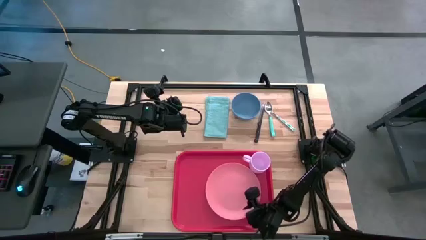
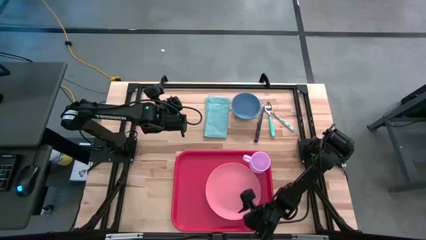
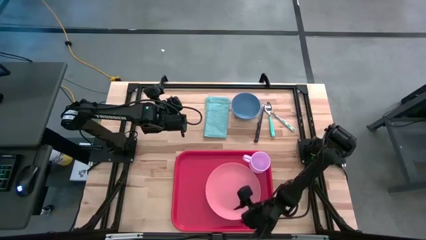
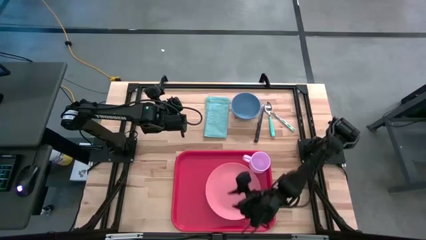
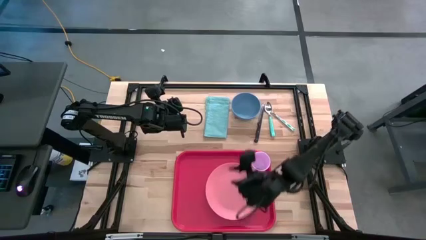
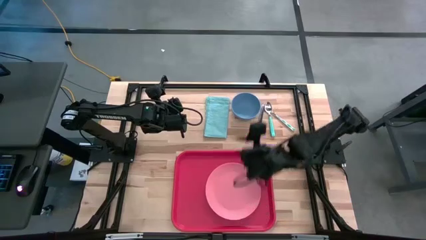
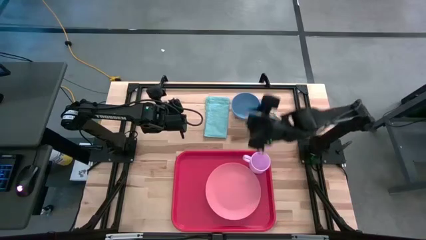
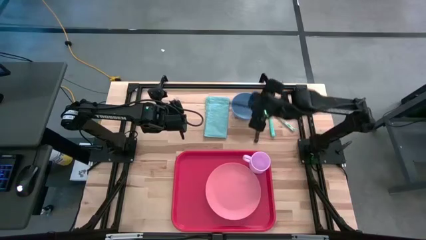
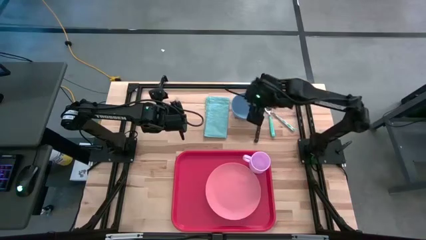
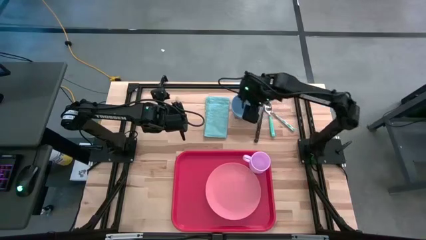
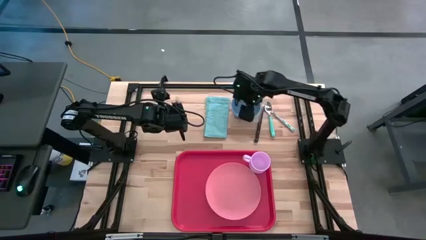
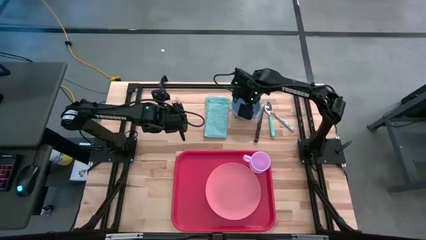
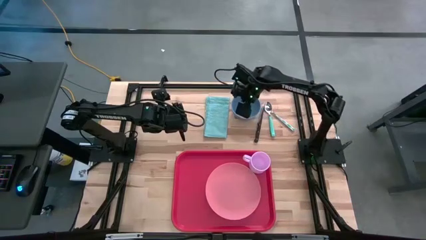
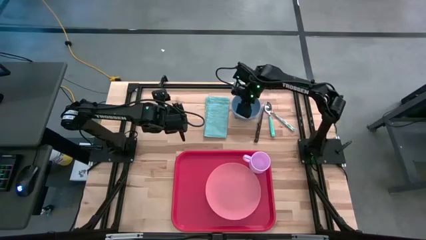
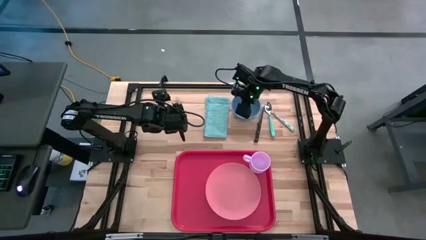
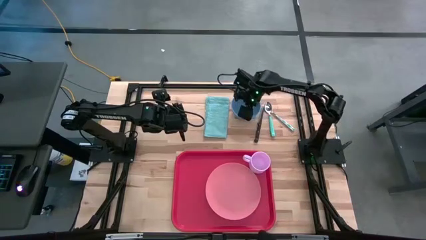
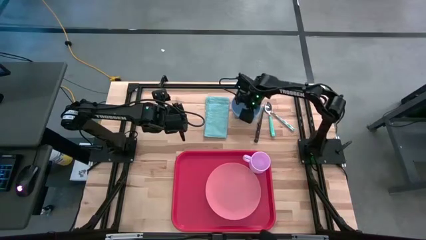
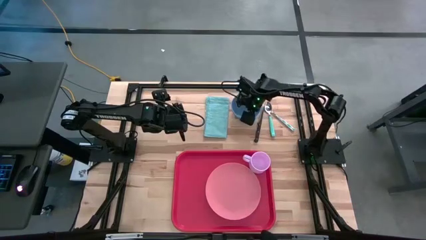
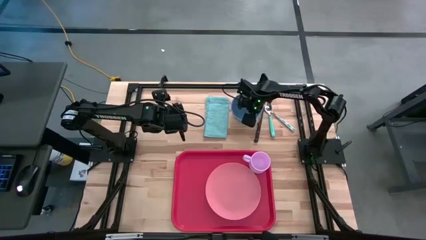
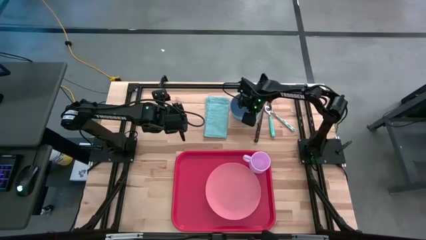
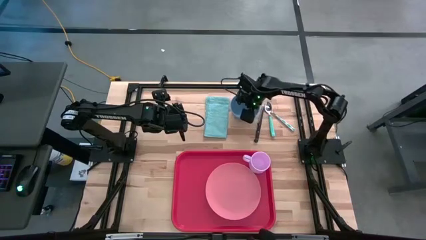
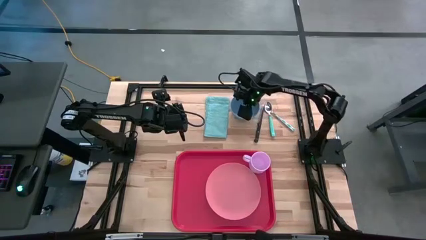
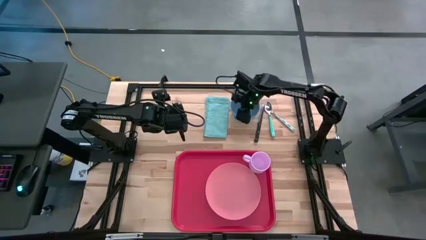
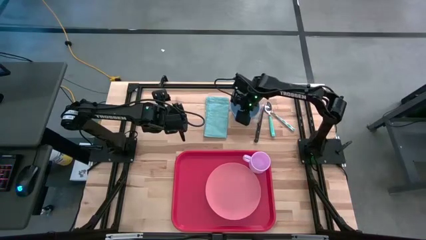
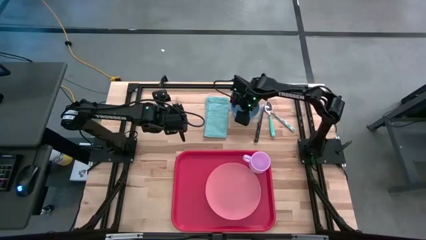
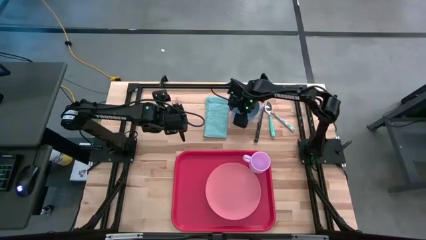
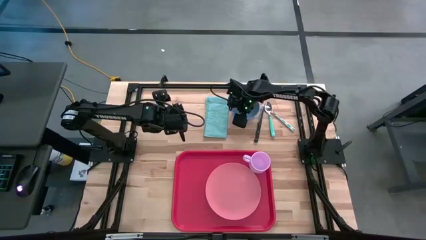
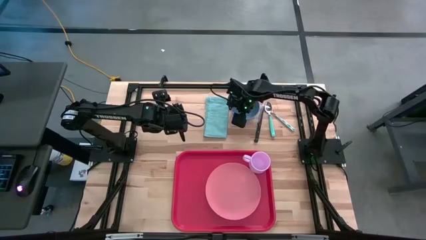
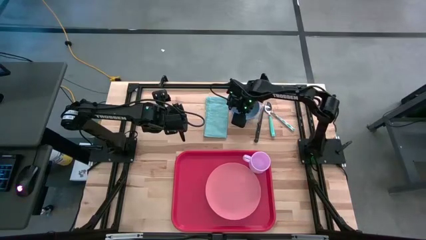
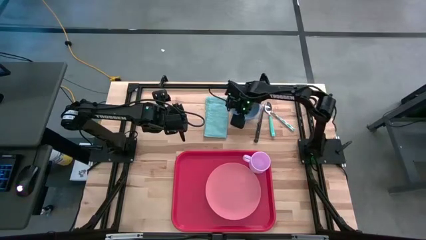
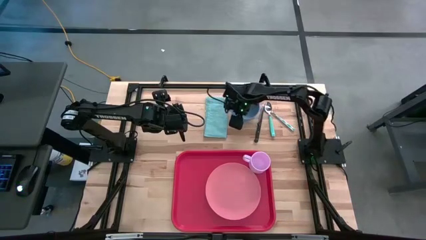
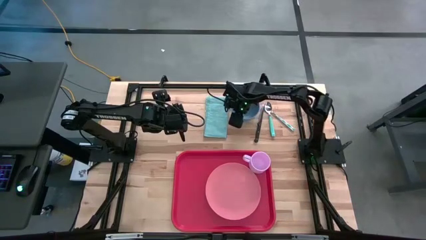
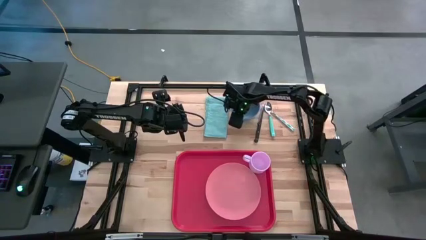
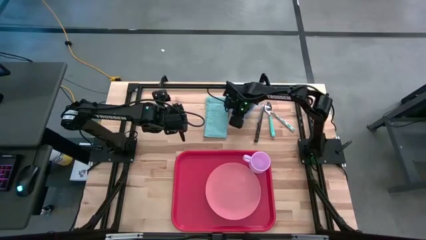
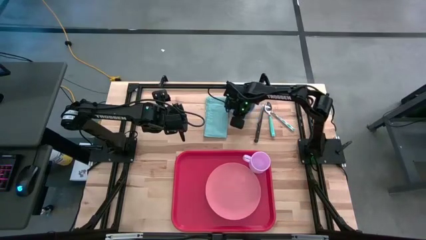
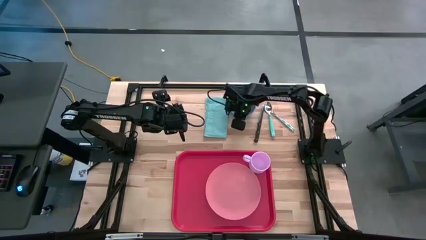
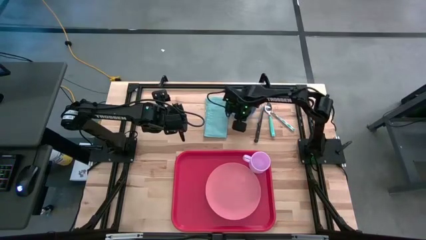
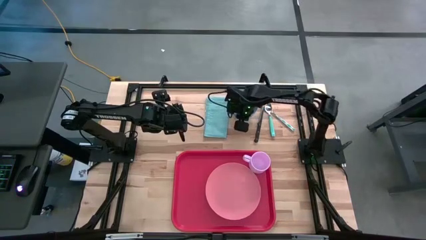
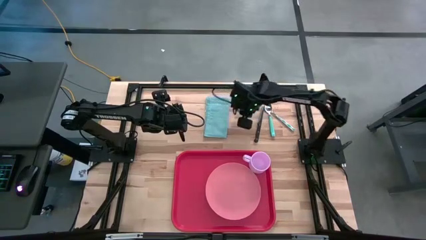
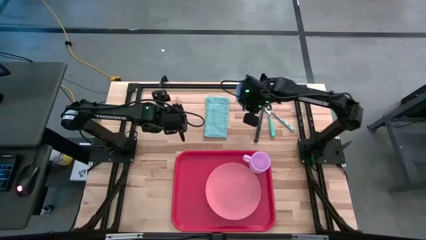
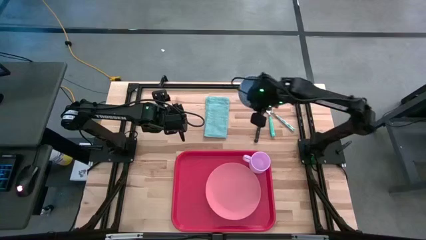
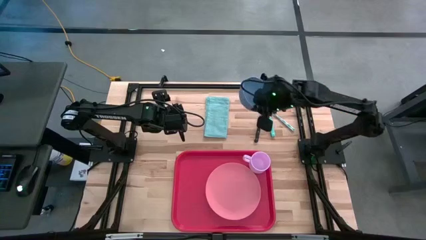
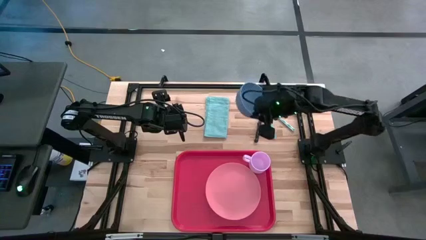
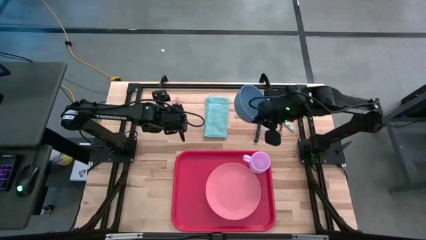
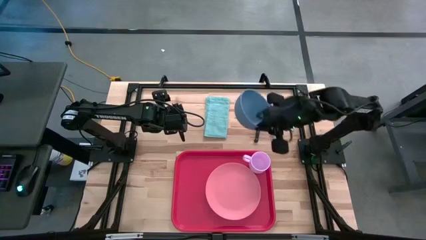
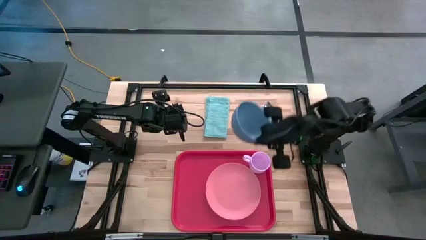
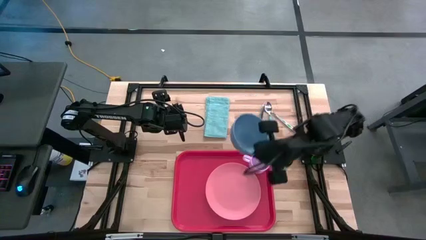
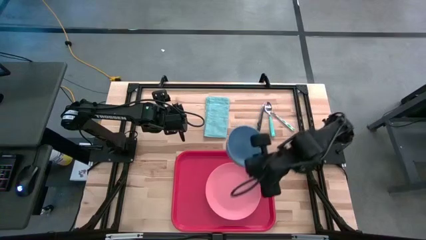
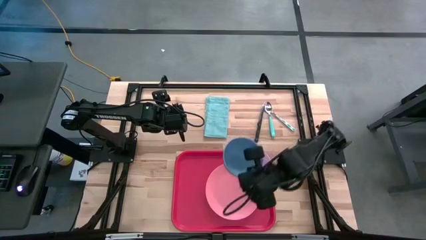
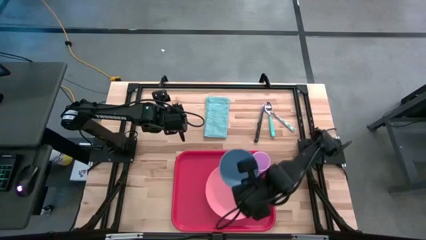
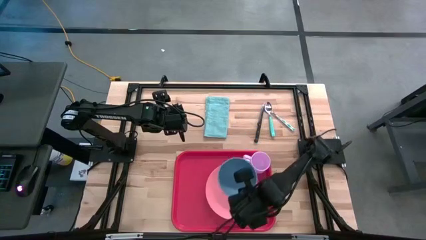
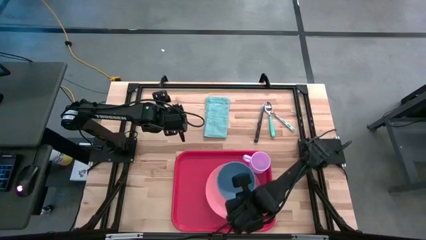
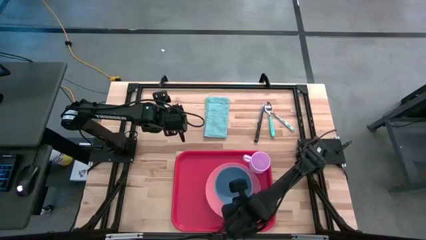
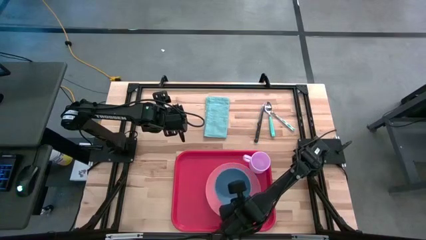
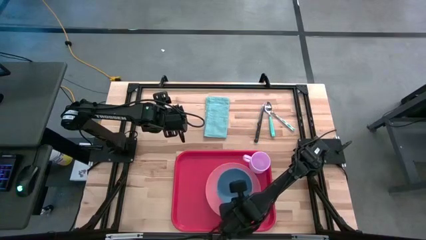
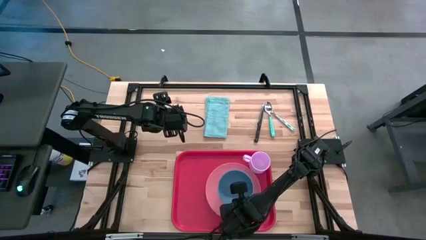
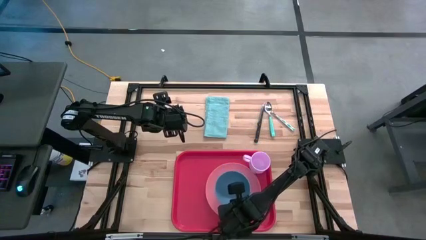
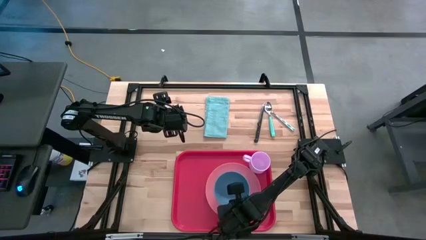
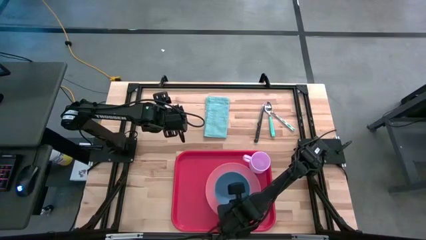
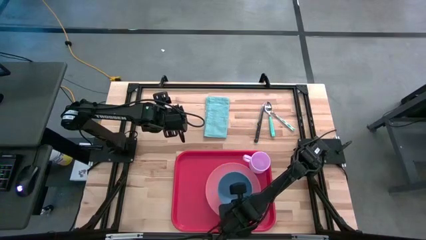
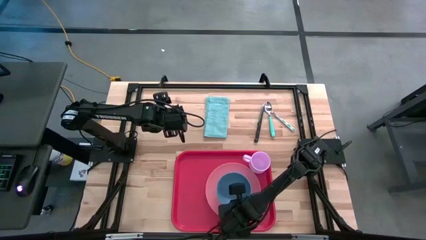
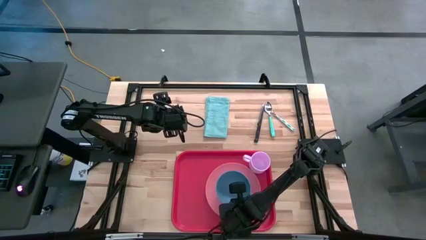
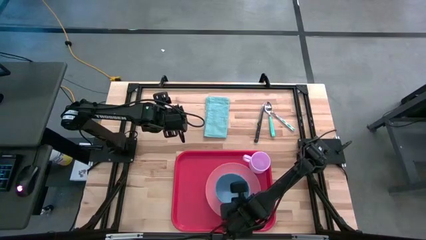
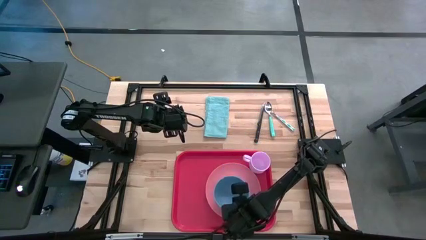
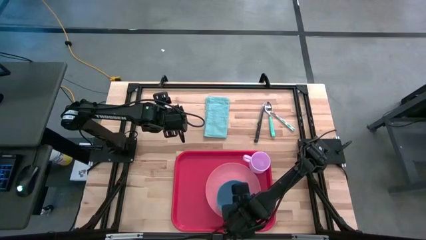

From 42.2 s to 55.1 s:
Task: Set up tray
Put the blue bowl on the pink plate

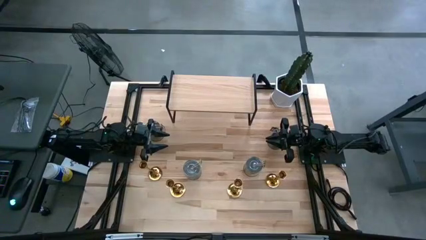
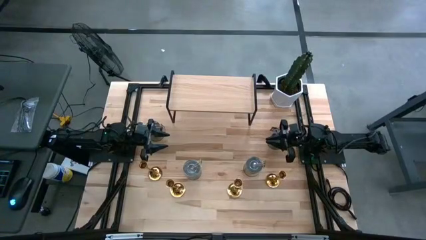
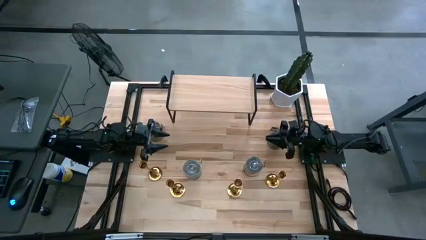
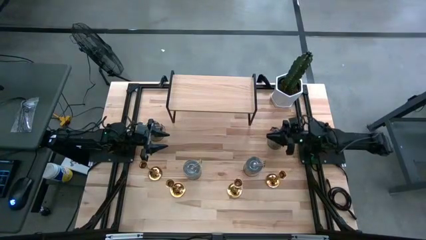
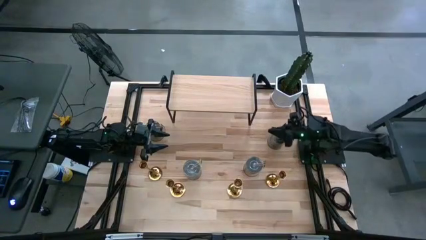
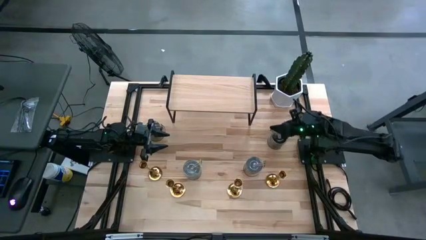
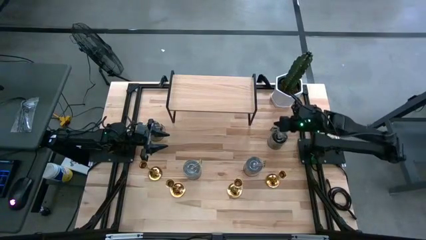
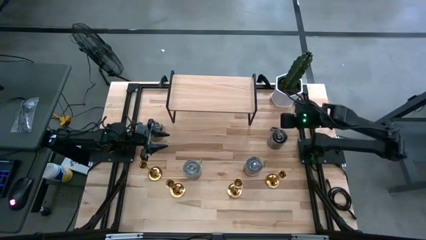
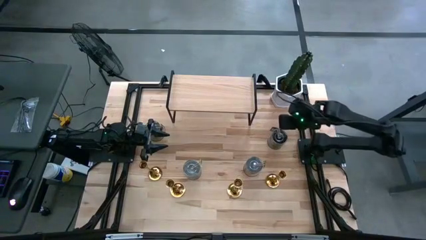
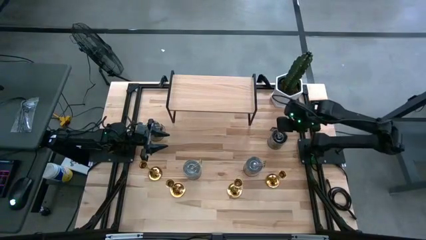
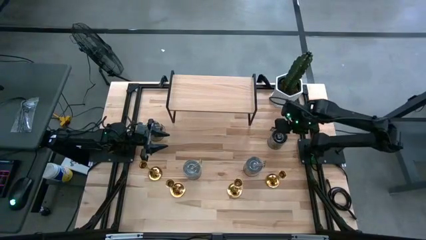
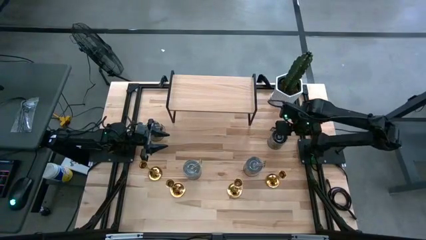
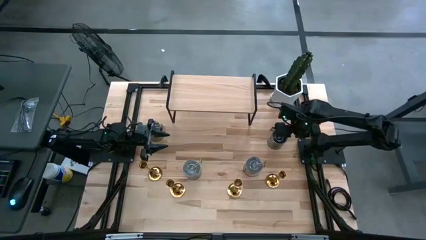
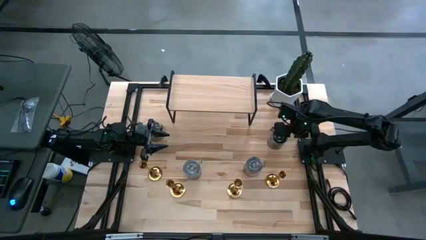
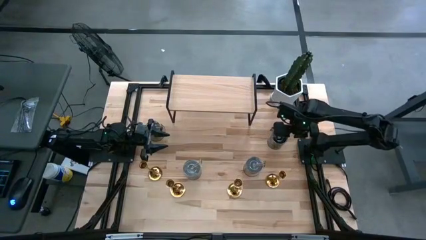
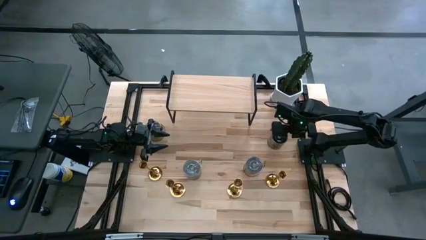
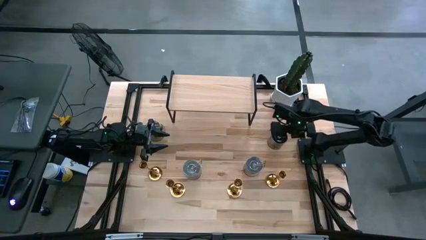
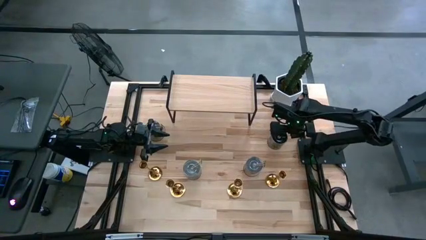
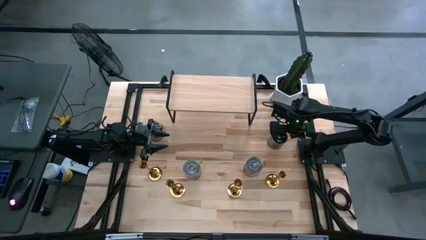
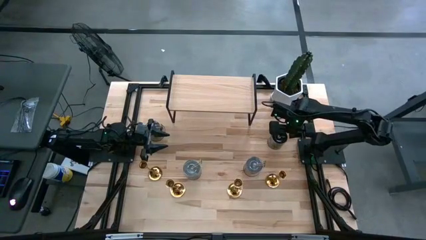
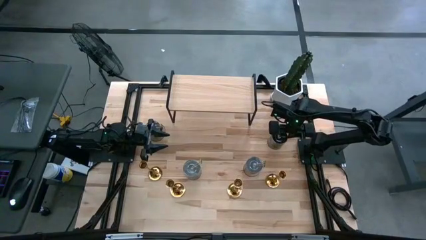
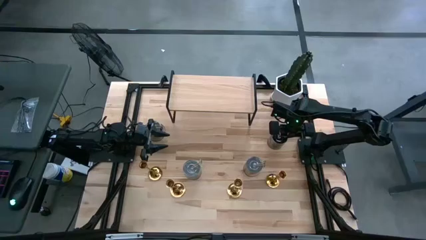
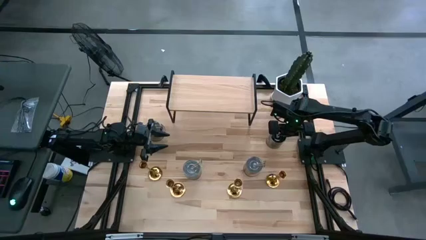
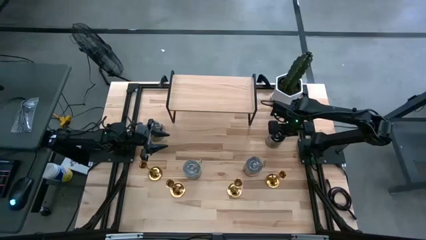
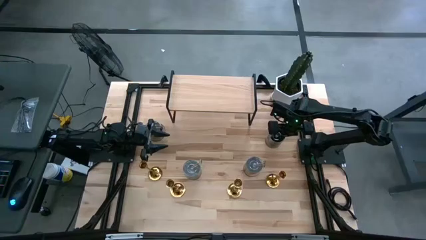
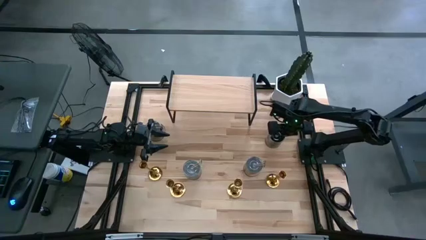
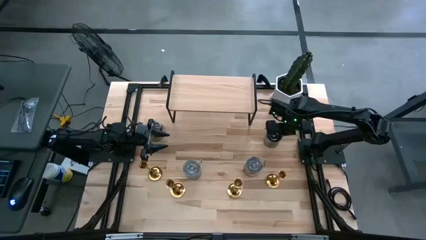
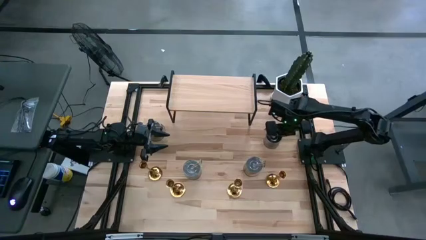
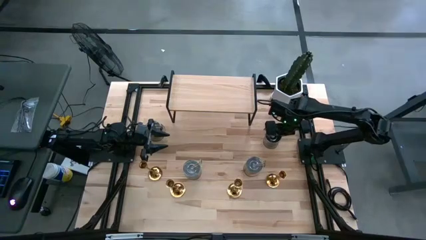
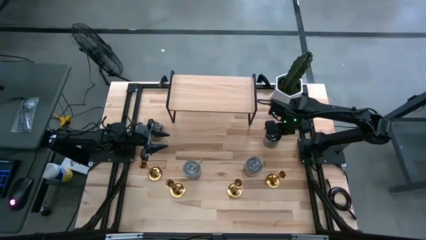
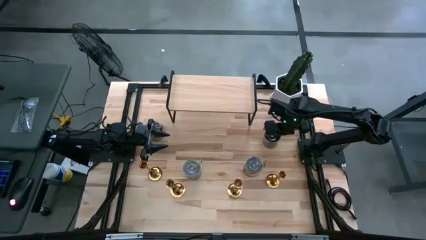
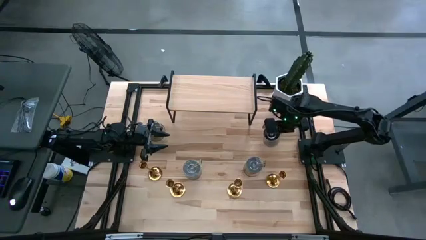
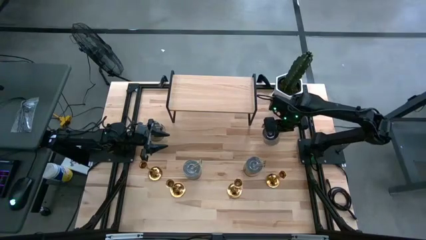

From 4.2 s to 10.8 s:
Task: Pick & Place candle stick holders
Put the silver scented candle on the shelf
